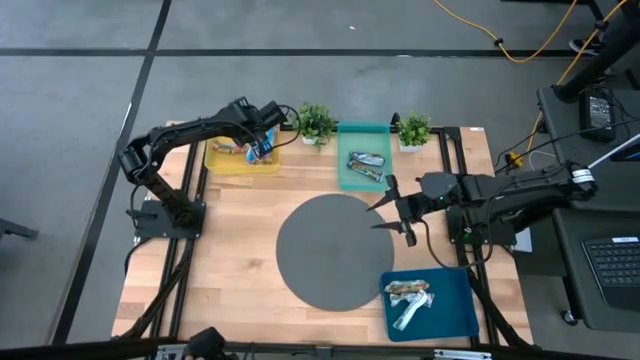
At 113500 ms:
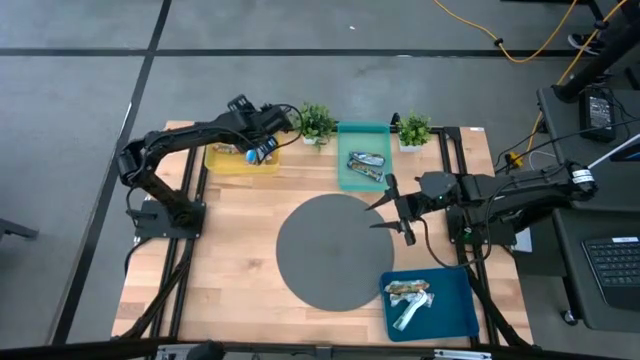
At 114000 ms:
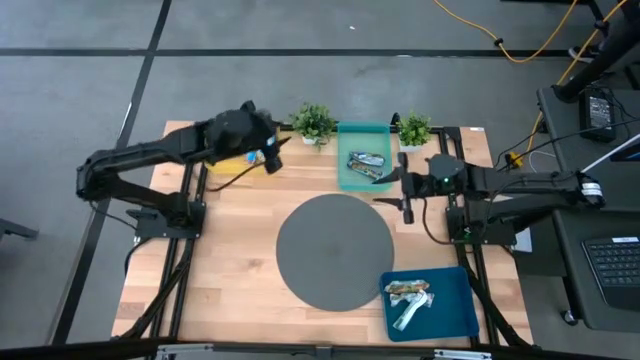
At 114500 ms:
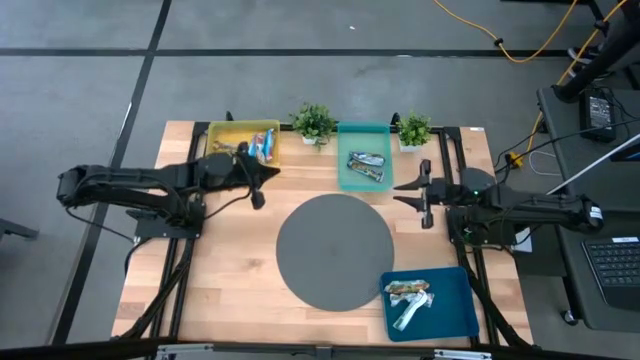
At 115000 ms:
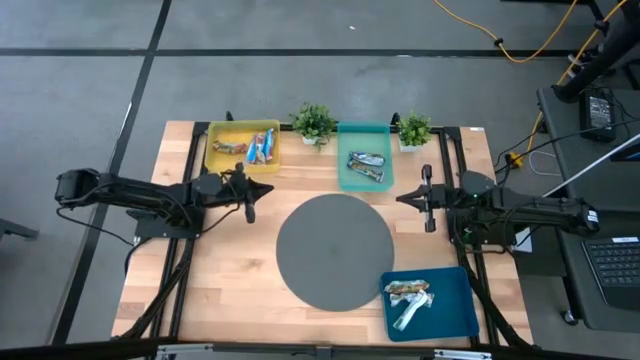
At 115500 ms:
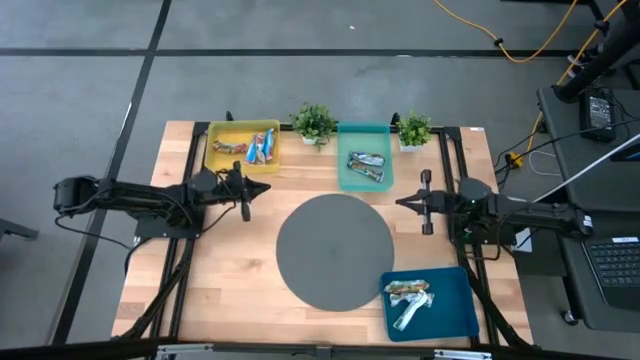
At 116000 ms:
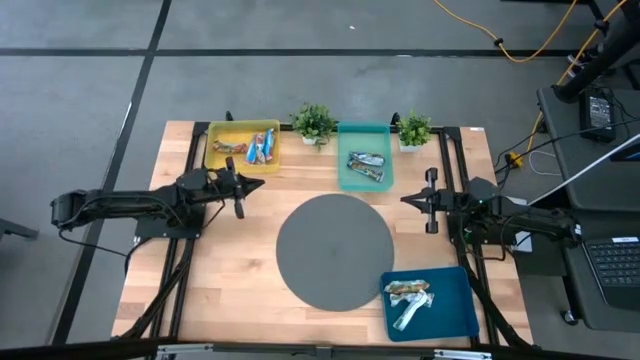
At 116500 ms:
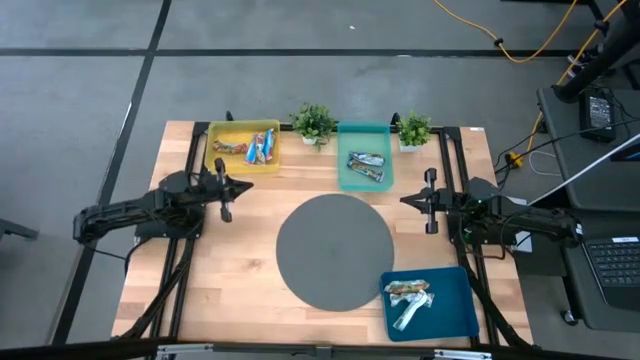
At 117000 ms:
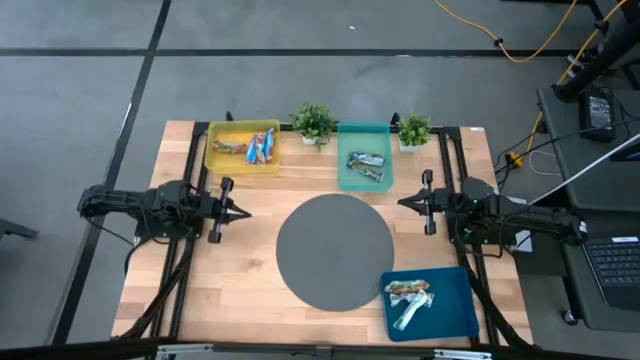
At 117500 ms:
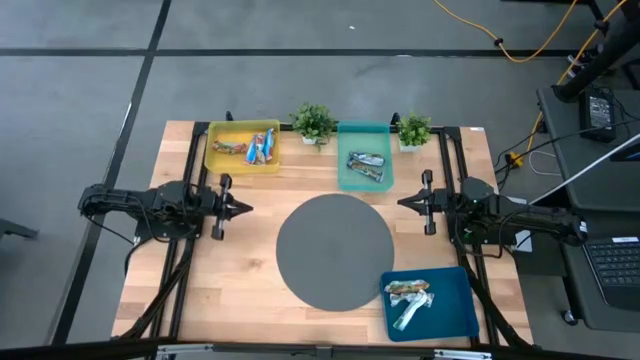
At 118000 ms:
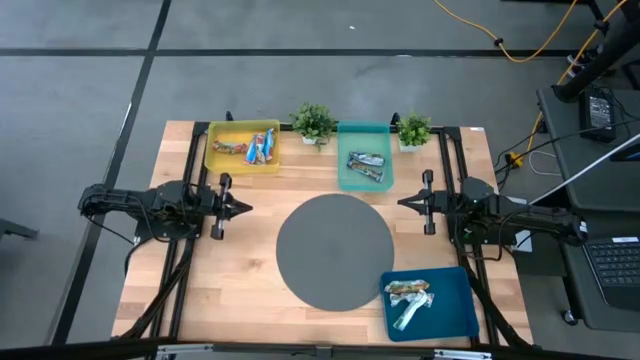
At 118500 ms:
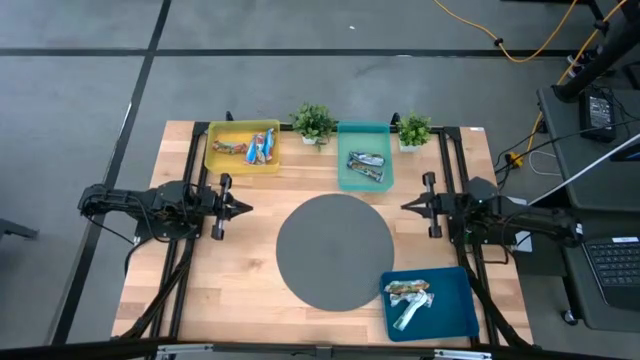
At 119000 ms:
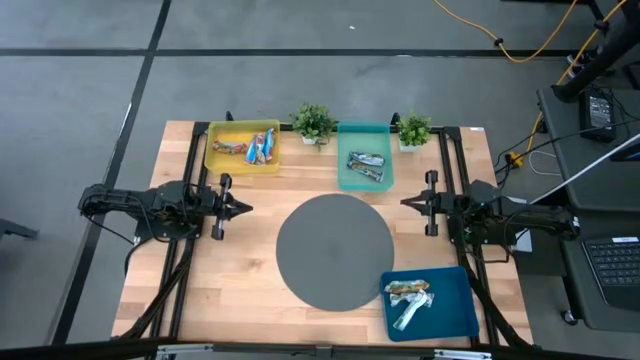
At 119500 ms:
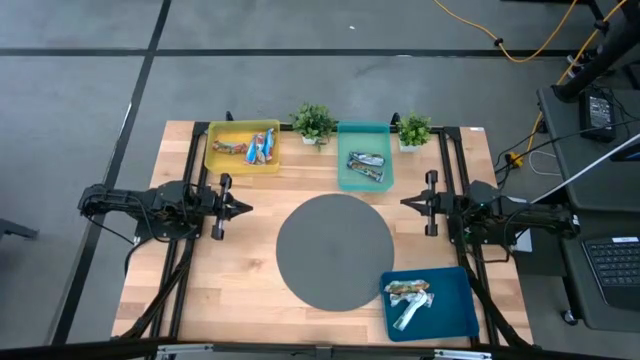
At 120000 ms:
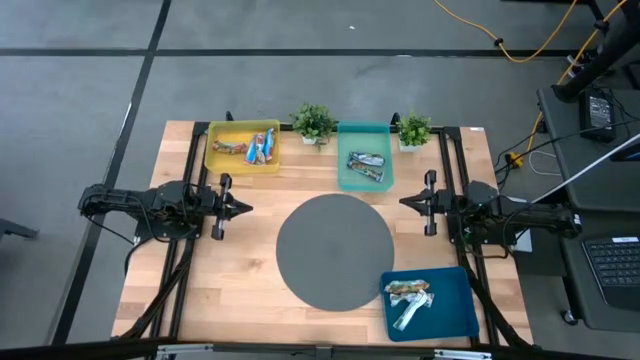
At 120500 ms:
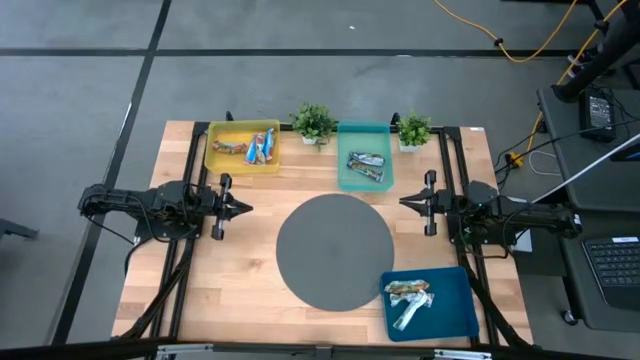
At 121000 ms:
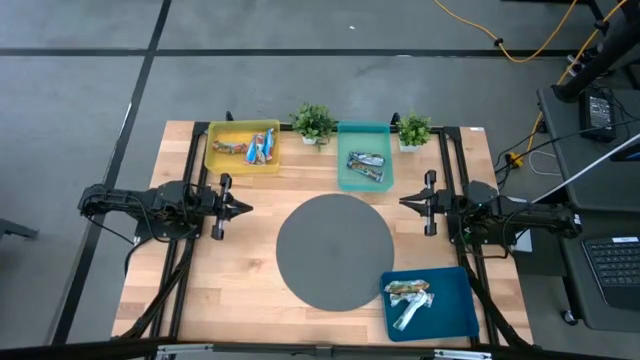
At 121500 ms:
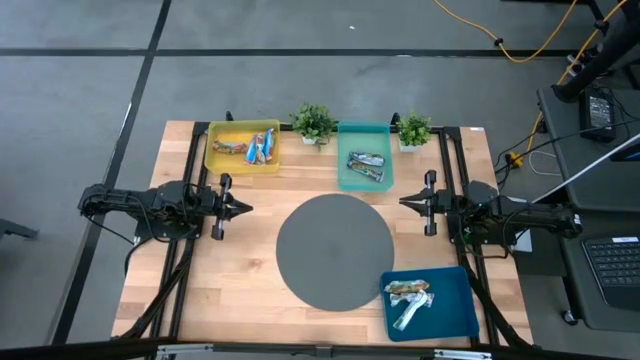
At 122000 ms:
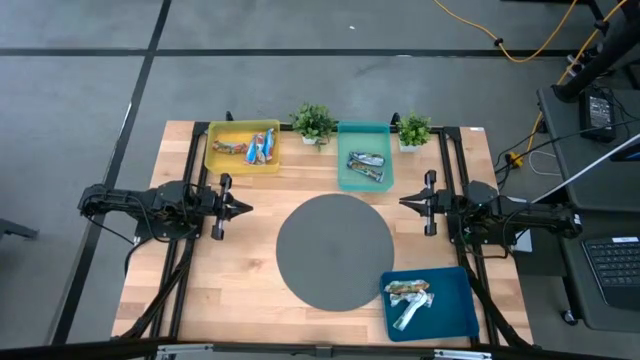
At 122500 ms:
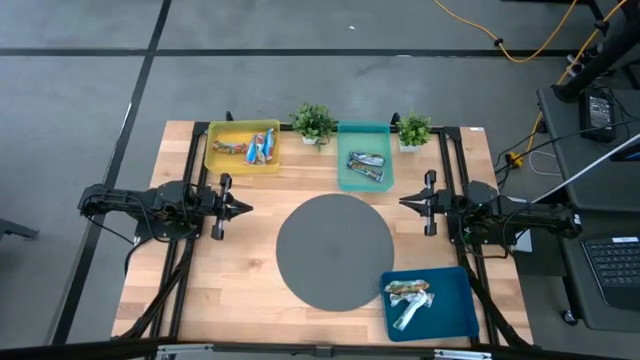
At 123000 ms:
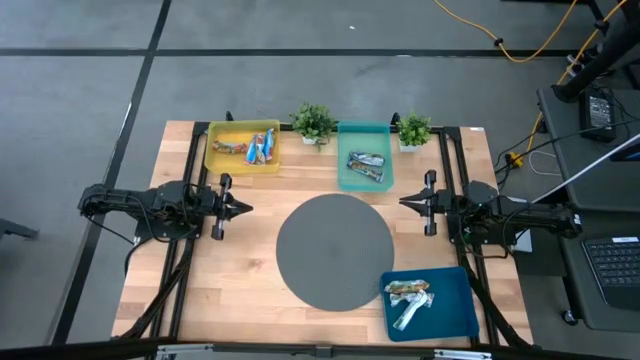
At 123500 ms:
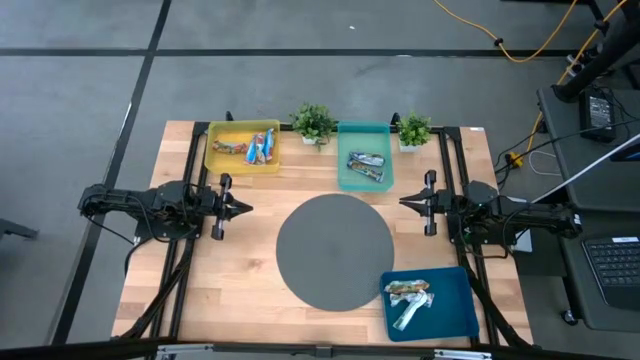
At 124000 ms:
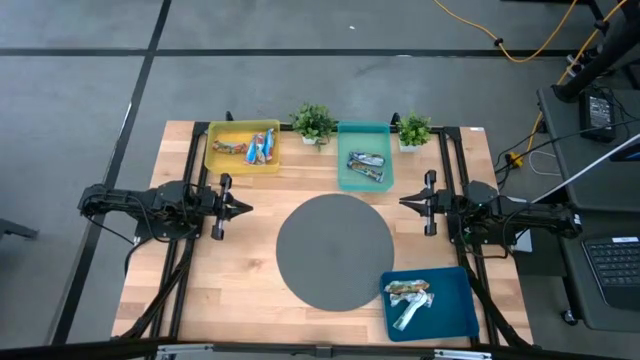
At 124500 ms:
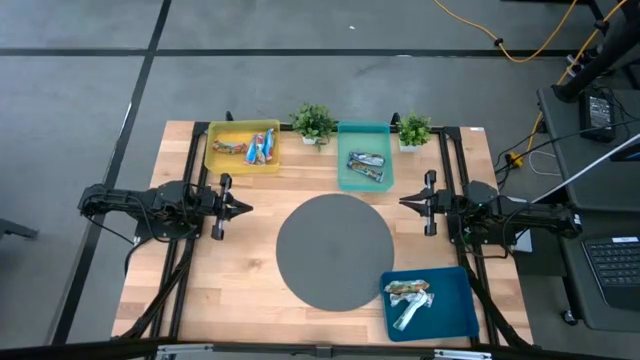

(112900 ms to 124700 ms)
Task: Pick and place Granola Bars by type
Return to Home Position

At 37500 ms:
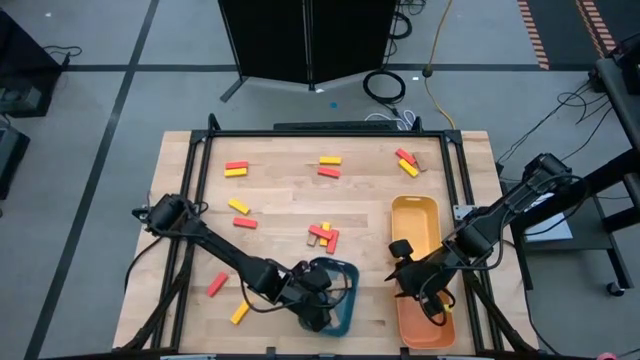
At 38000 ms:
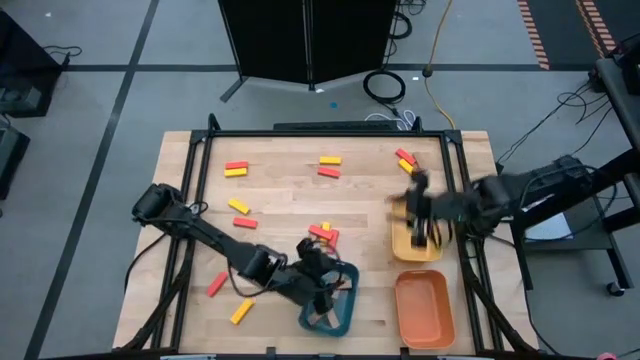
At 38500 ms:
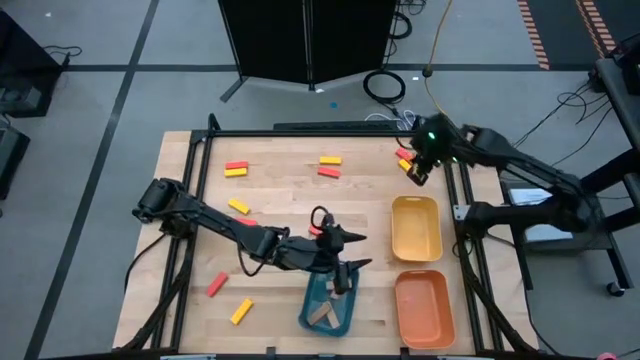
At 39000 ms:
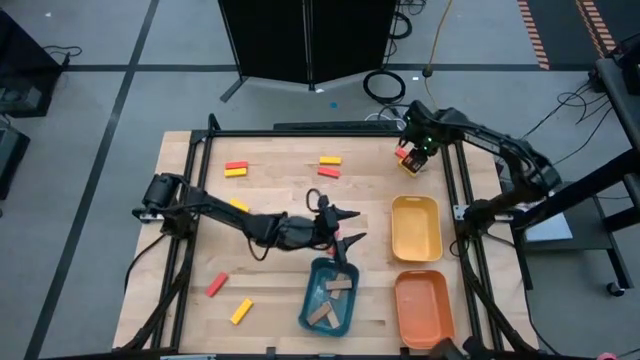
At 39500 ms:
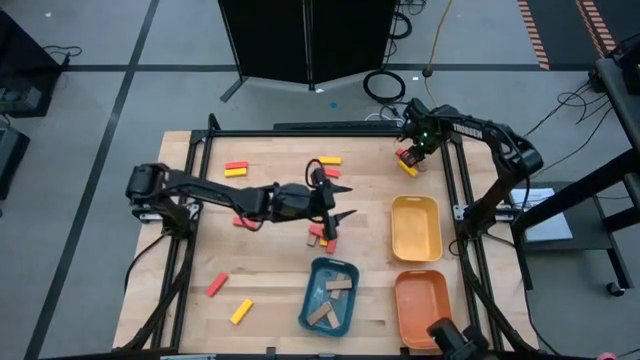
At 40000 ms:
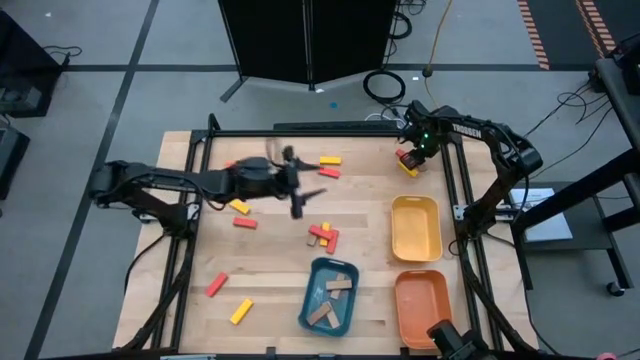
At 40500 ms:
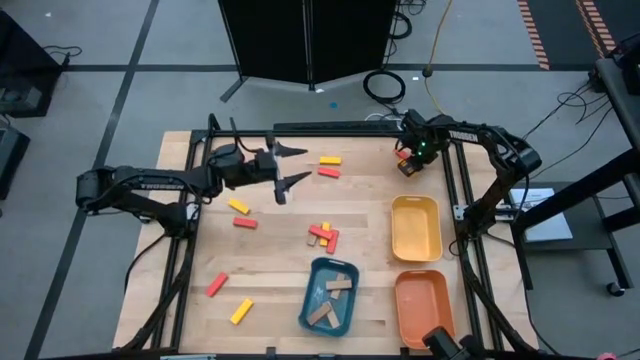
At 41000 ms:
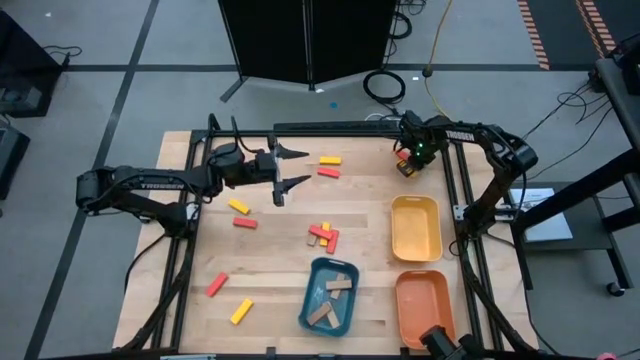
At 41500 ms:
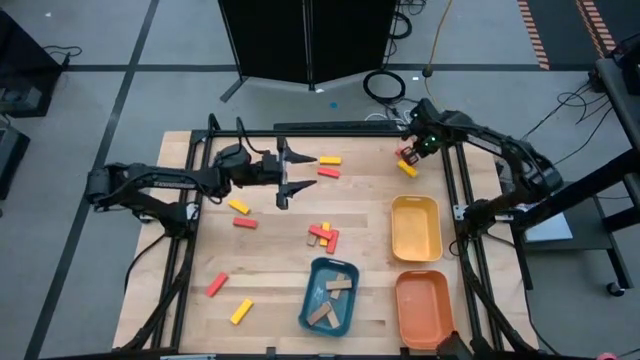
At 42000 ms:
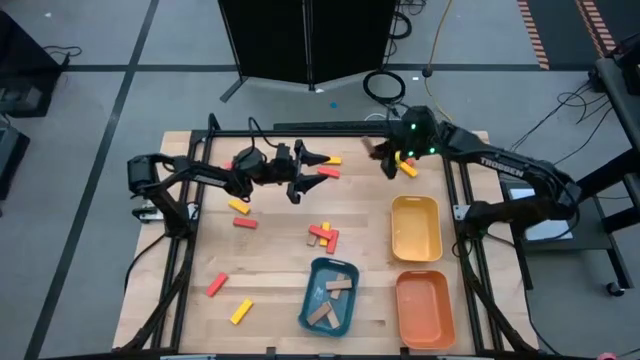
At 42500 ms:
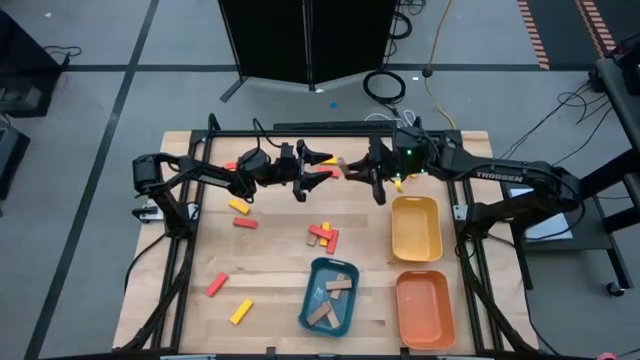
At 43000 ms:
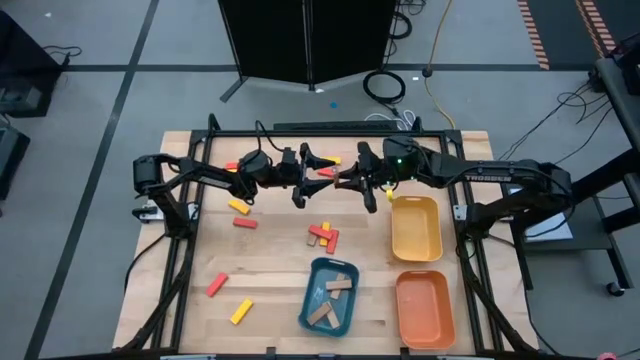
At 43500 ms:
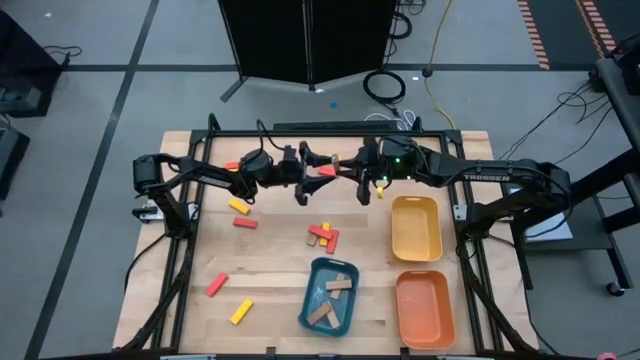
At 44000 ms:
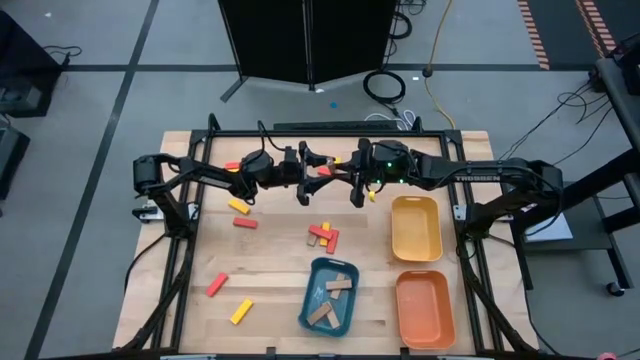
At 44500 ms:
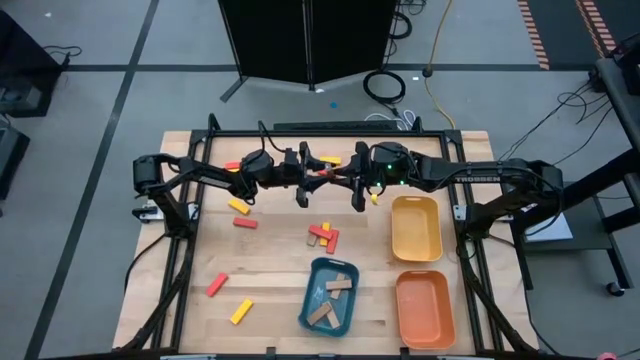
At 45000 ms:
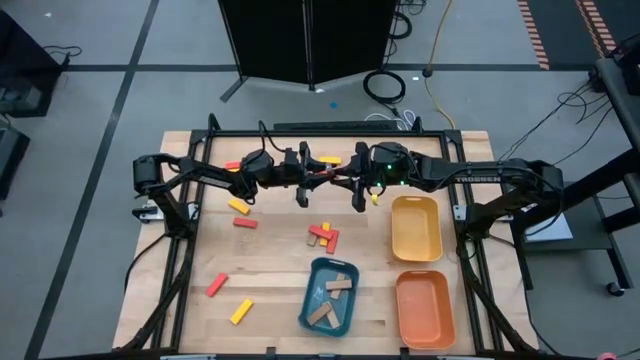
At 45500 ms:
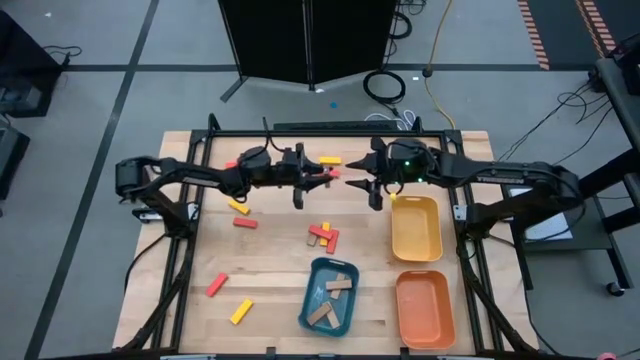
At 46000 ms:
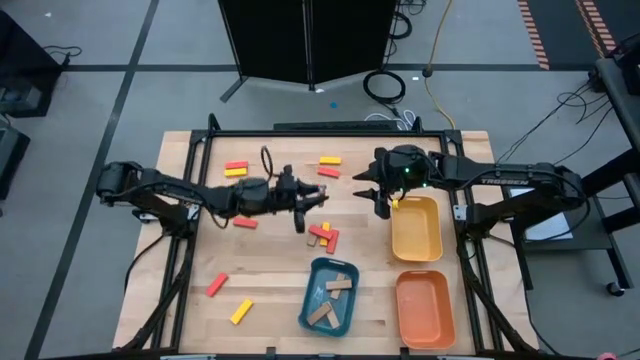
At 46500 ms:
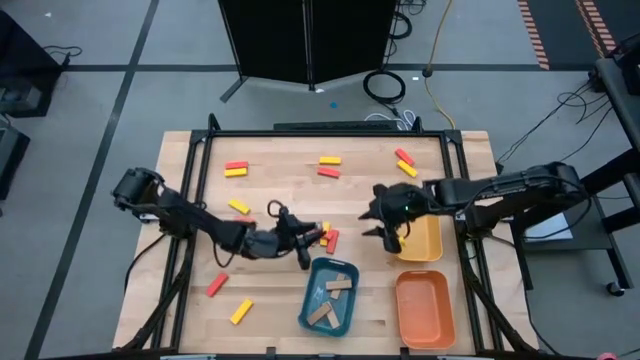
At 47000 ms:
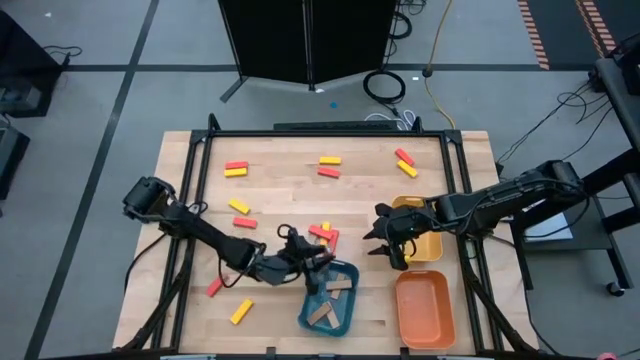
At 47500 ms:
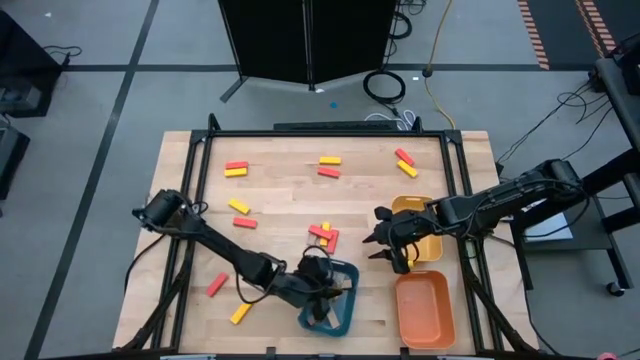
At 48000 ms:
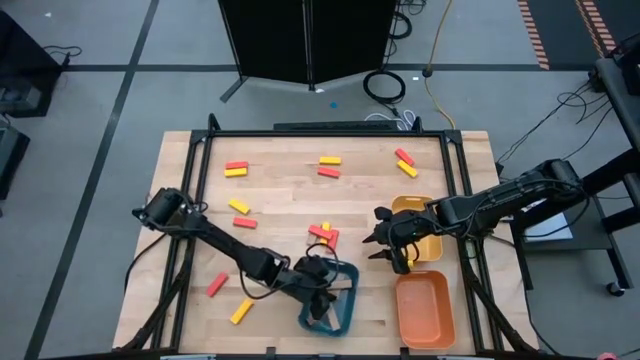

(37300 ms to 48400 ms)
Task: Sort blocks
Put the brown block into the blue bin
